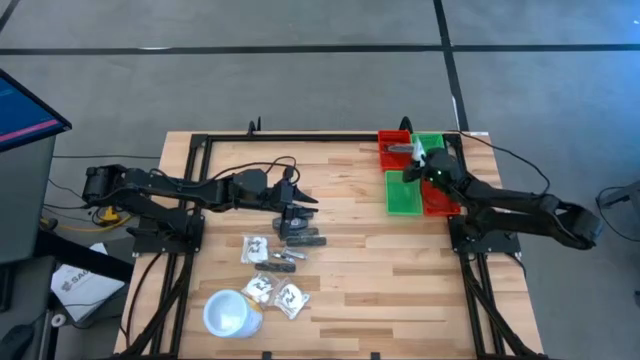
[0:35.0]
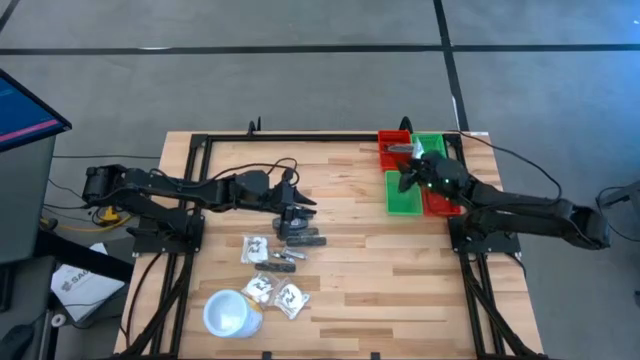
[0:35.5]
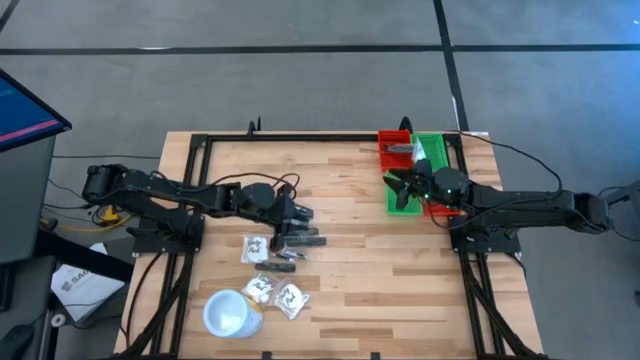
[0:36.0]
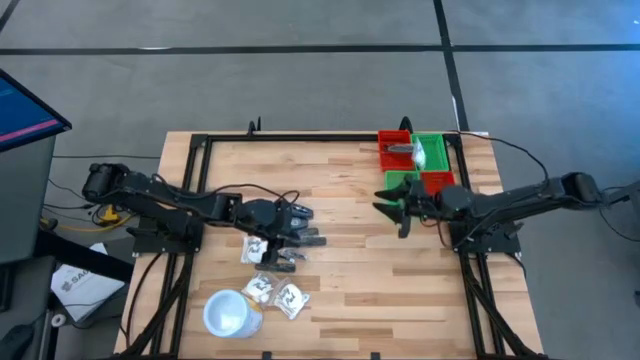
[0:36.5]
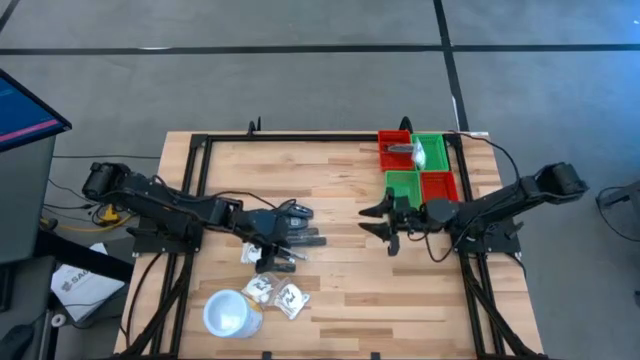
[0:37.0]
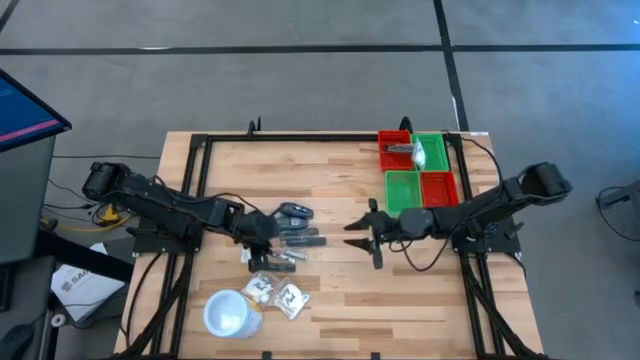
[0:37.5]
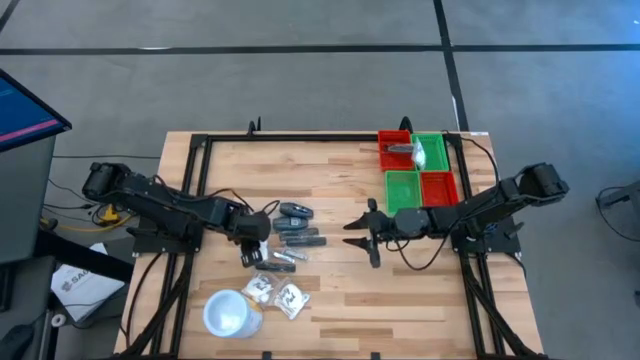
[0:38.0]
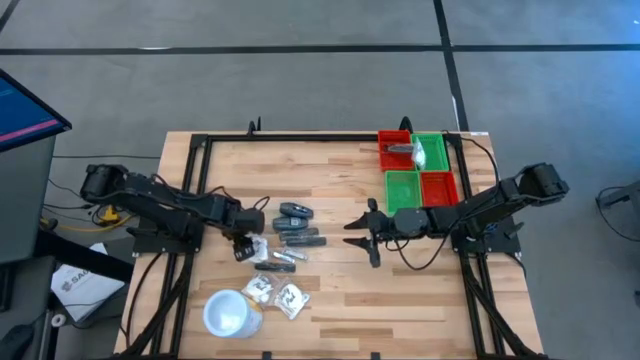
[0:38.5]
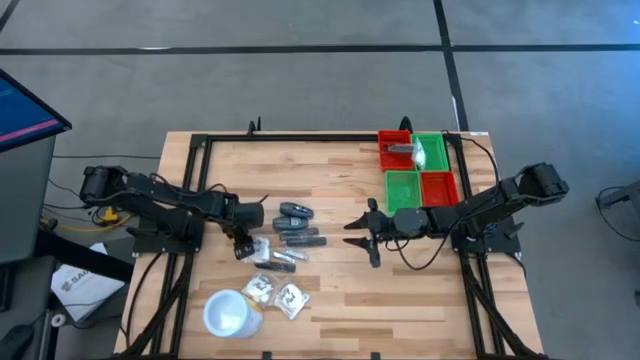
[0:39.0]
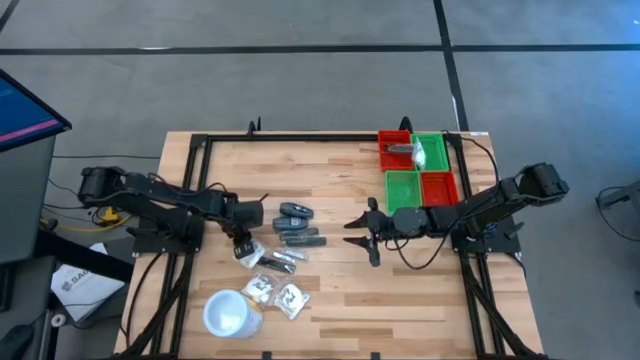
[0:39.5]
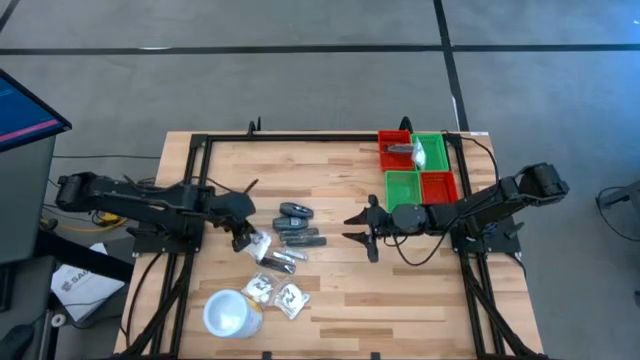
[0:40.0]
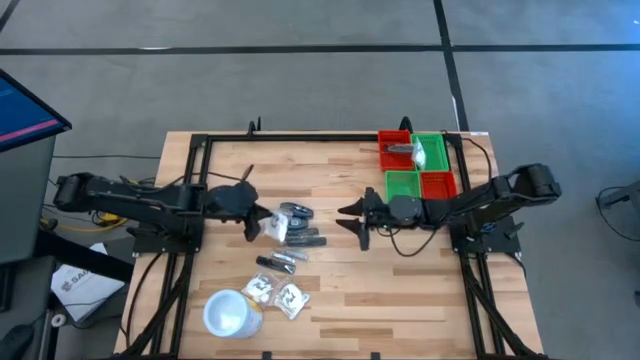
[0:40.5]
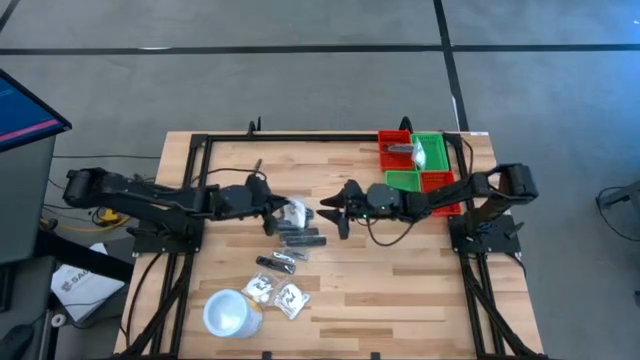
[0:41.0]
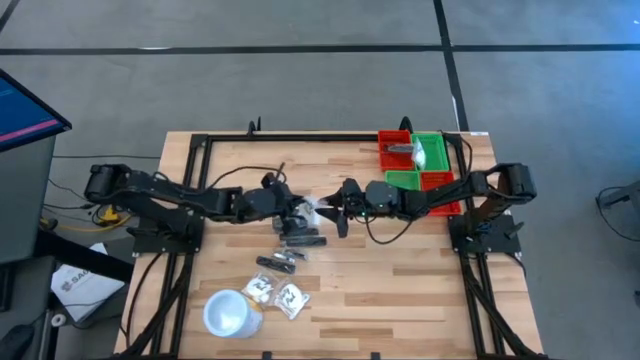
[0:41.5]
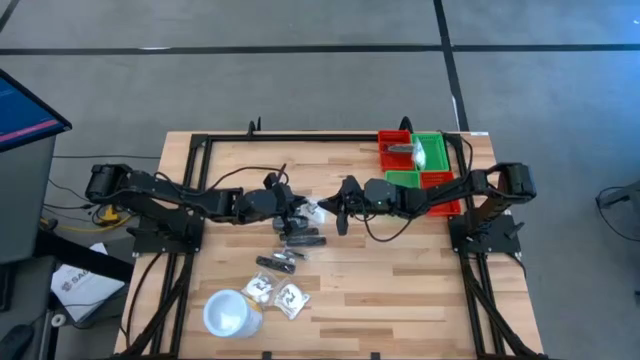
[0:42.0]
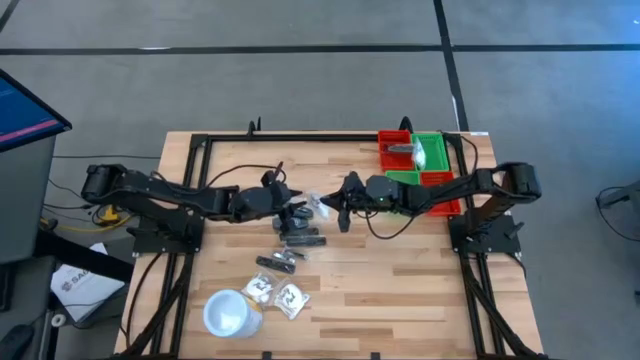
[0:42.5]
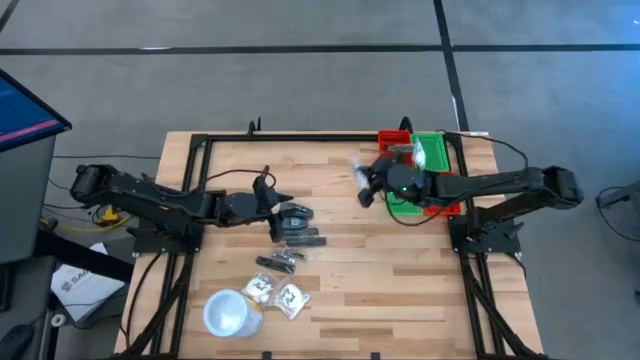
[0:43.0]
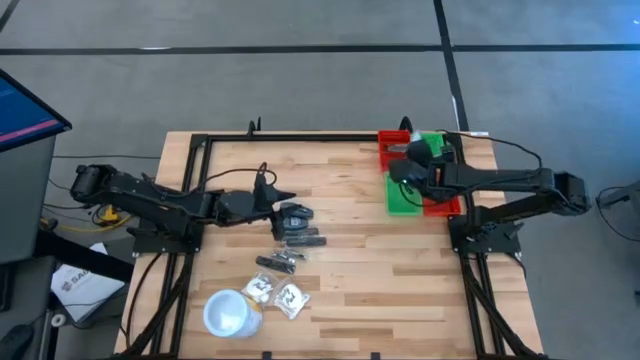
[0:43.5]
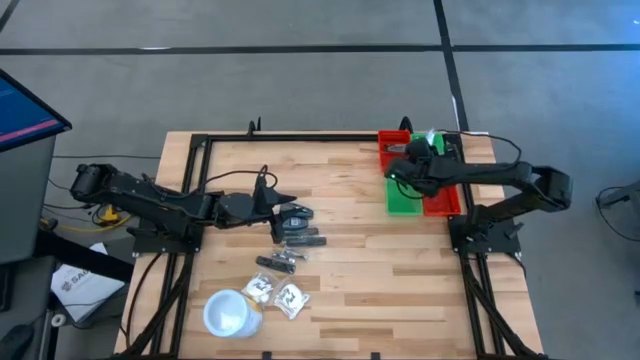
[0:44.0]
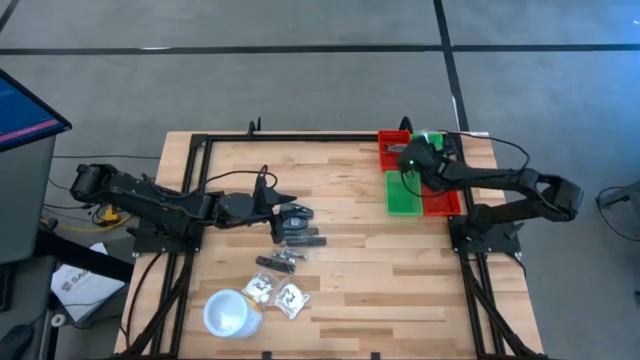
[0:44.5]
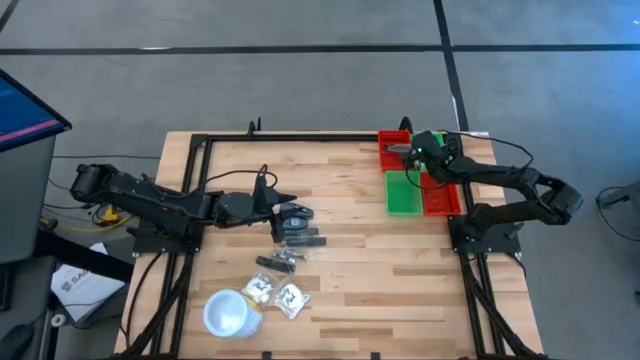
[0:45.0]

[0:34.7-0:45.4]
Task: Pick & Place Travel size toiletries
Put the white cotton pack into the top green bin

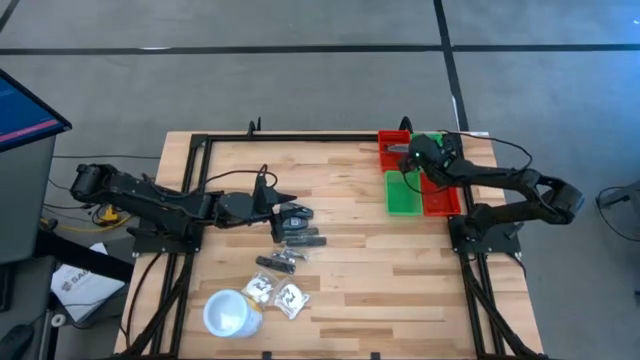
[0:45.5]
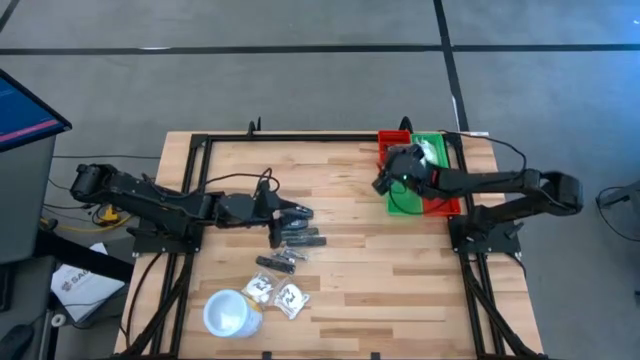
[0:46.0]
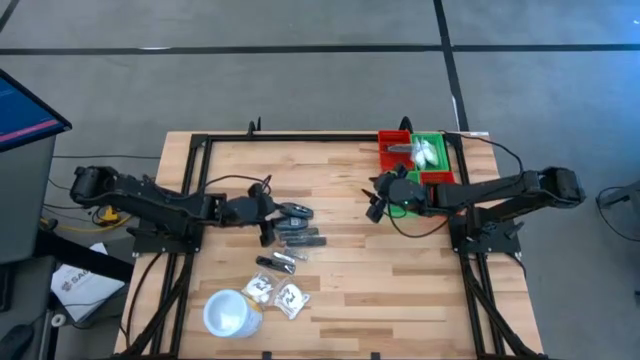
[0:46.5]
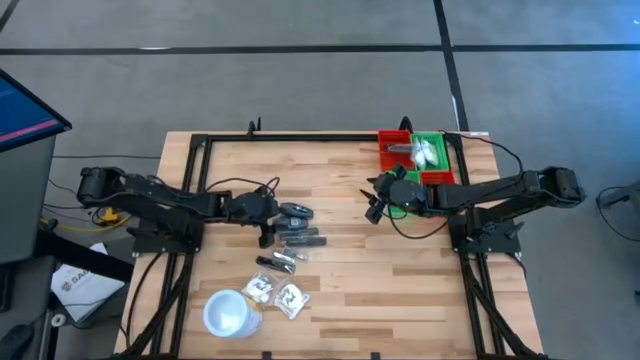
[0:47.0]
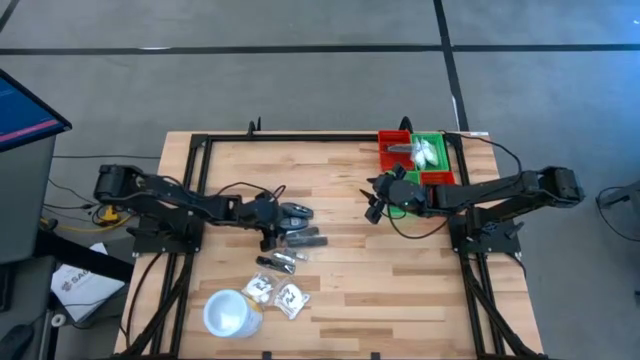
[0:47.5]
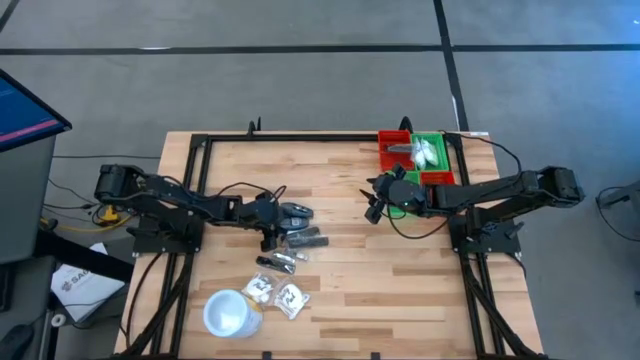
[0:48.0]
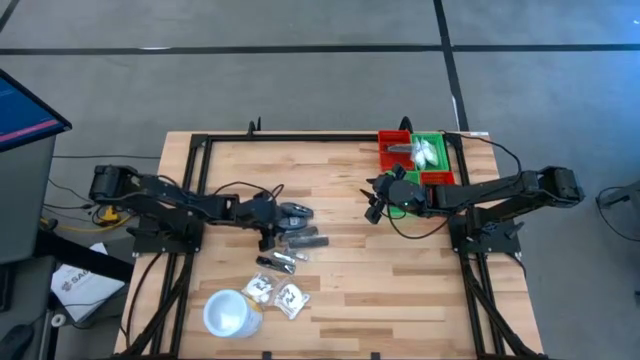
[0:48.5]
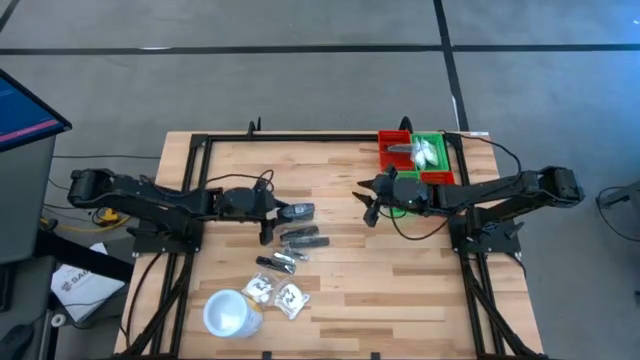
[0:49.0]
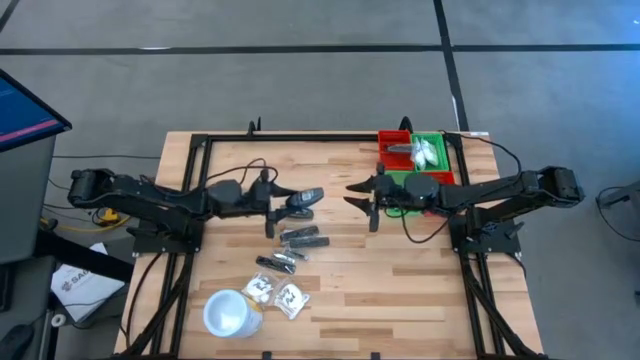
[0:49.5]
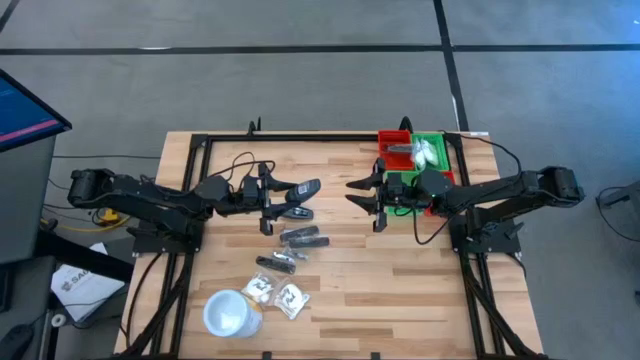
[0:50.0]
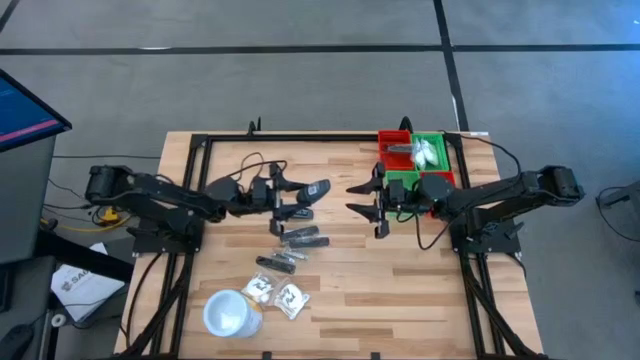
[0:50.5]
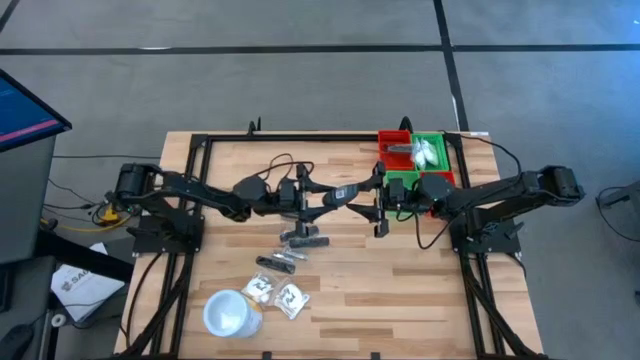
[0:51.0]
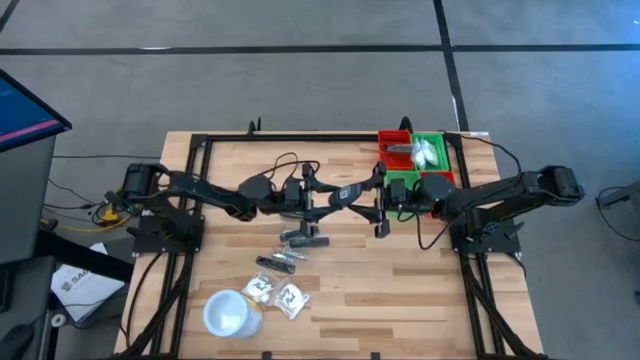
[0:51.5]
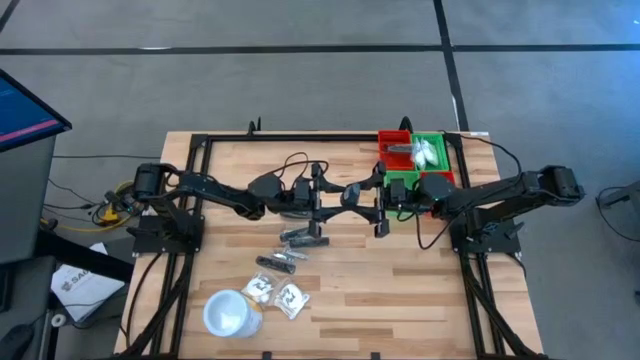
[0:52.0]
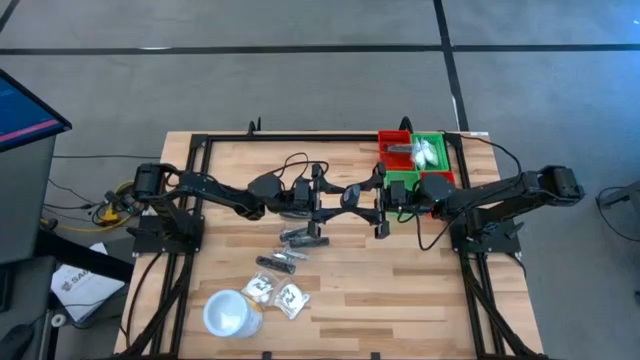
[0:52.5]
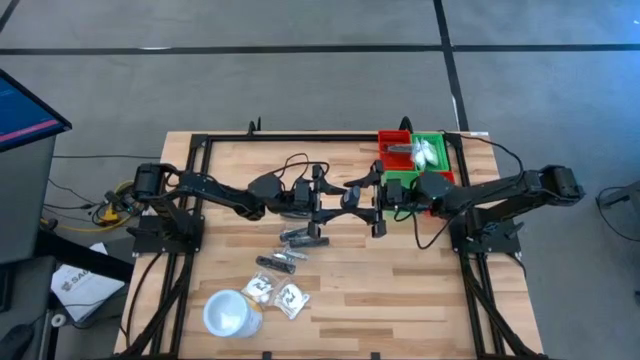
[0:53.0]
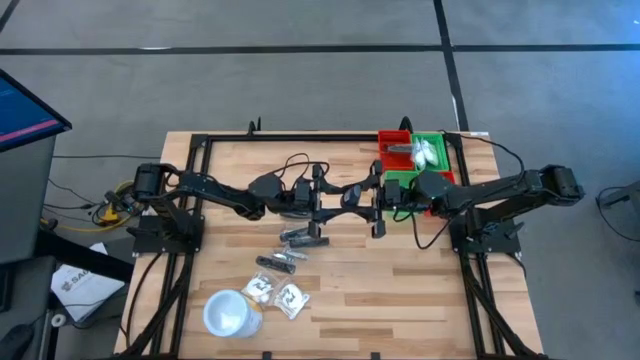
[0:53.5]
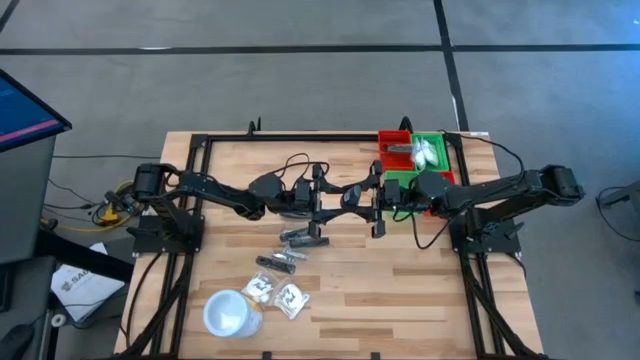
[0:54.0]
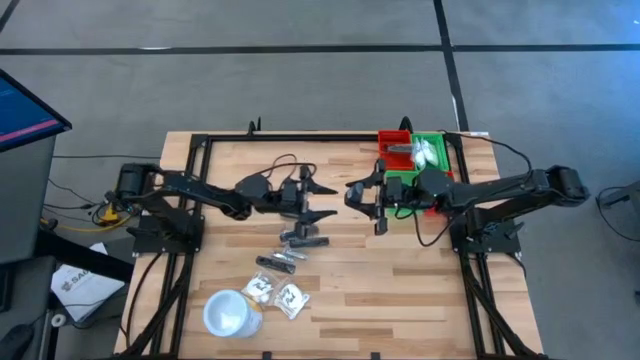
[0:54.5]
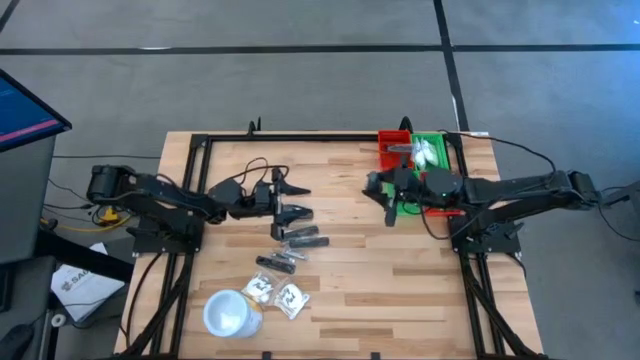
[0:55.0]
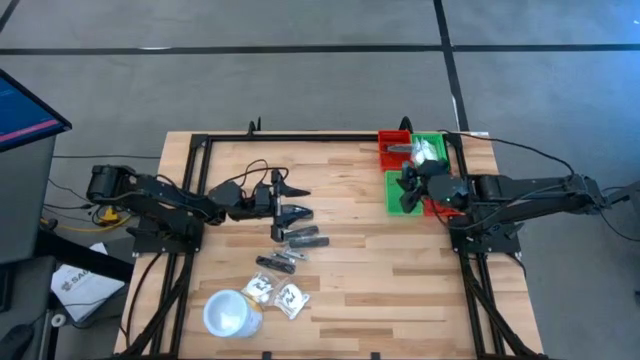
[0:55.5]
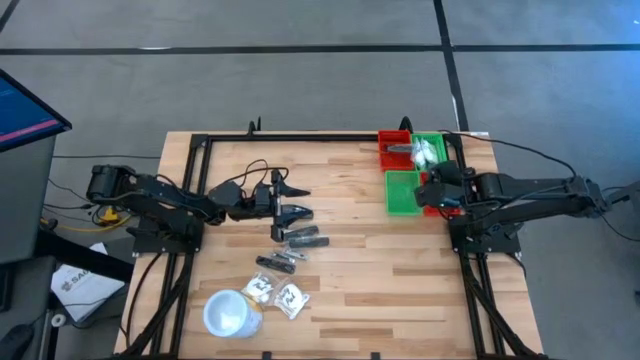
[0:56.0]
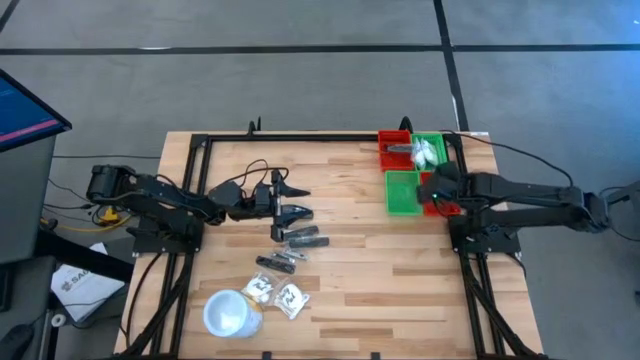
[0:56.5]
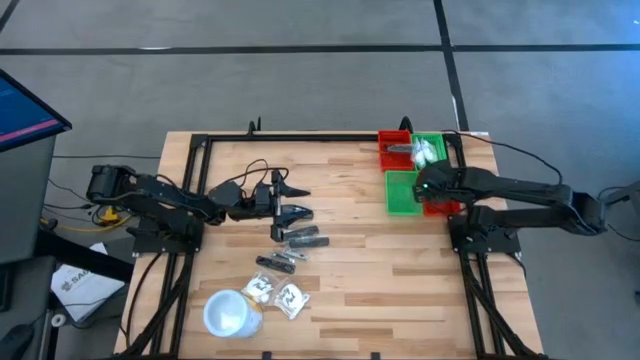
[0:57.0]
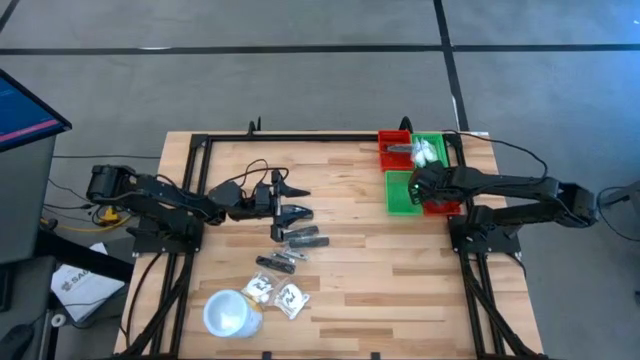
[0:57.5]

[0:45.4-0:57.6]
Put the gray deodorant into the bottom red bin
